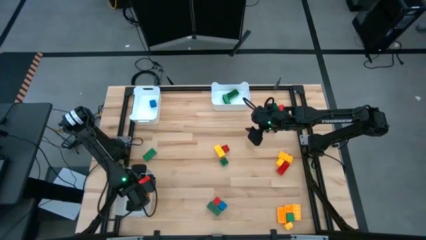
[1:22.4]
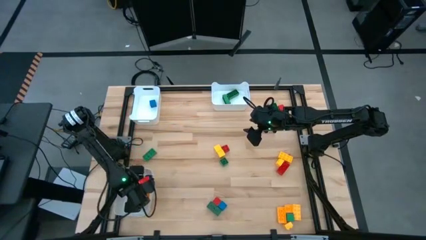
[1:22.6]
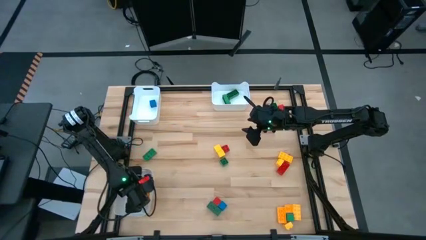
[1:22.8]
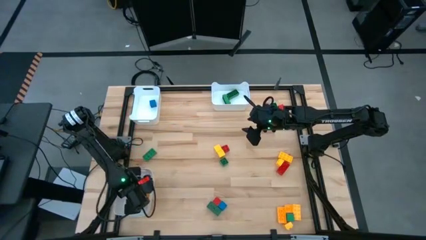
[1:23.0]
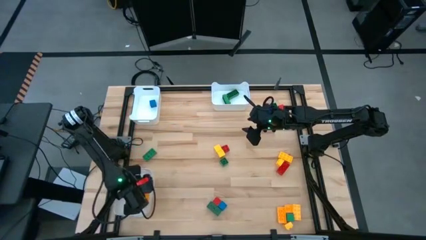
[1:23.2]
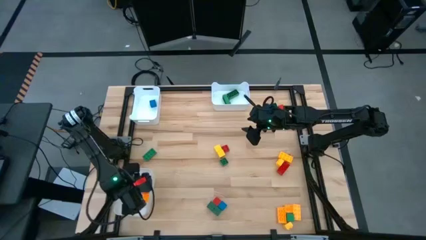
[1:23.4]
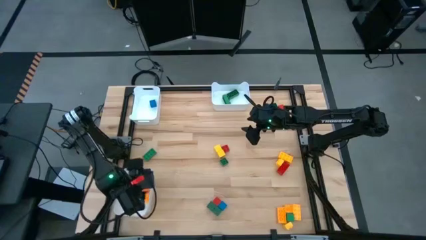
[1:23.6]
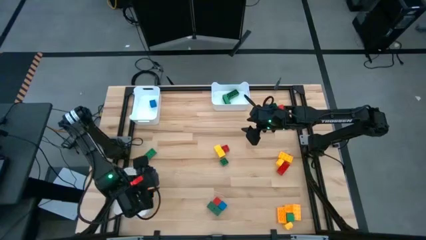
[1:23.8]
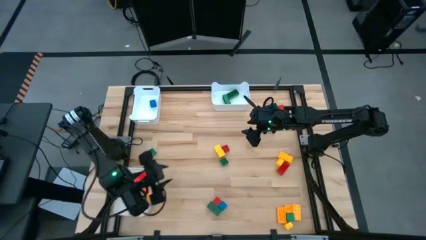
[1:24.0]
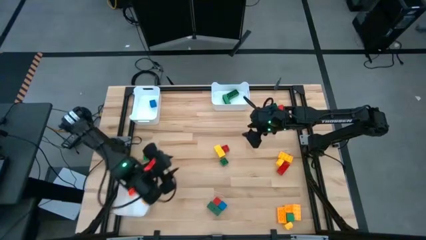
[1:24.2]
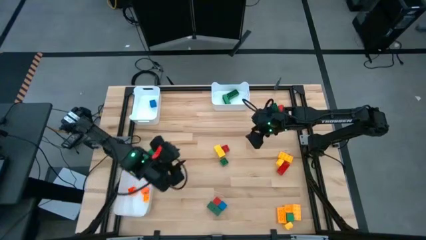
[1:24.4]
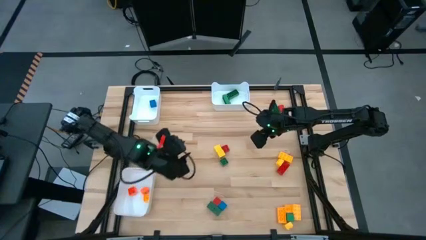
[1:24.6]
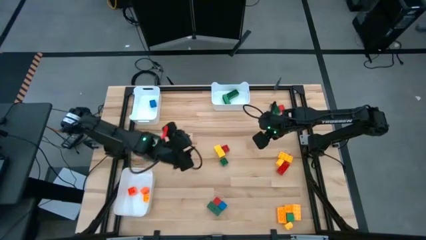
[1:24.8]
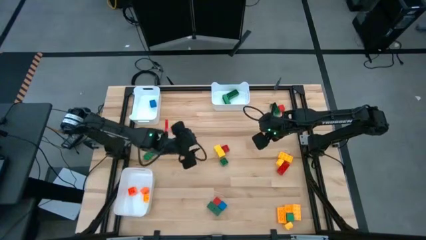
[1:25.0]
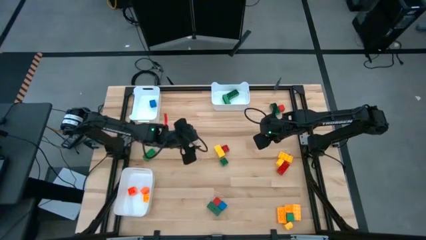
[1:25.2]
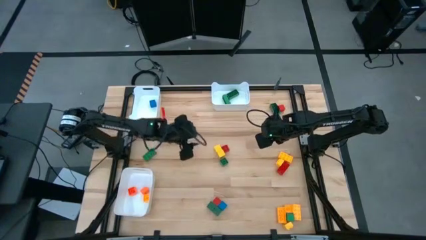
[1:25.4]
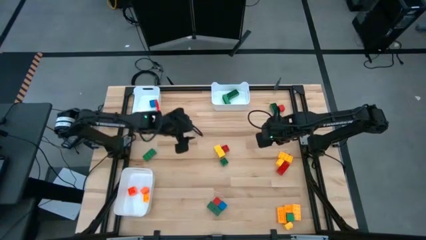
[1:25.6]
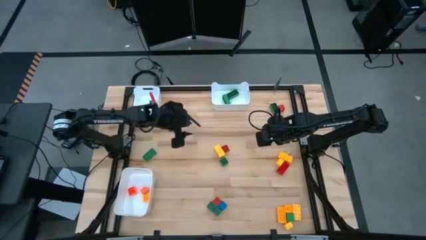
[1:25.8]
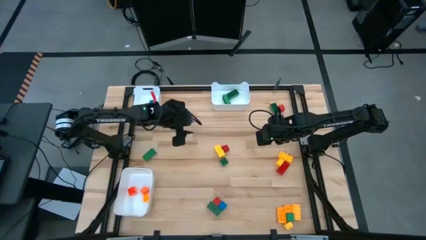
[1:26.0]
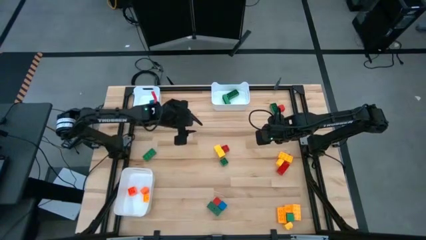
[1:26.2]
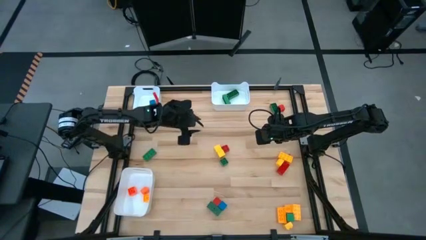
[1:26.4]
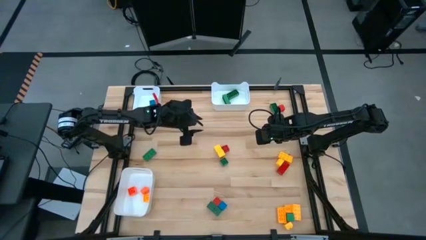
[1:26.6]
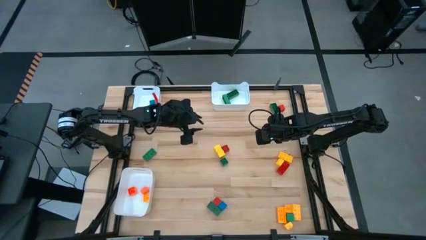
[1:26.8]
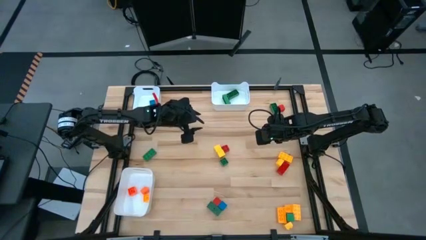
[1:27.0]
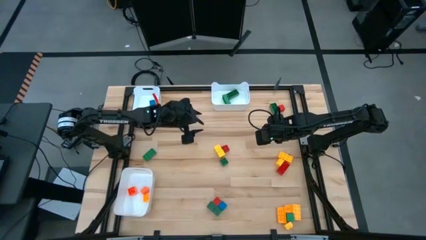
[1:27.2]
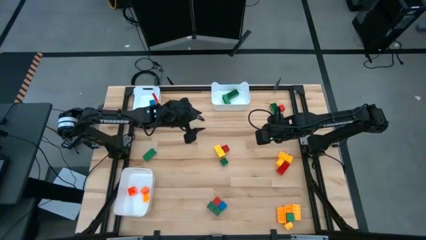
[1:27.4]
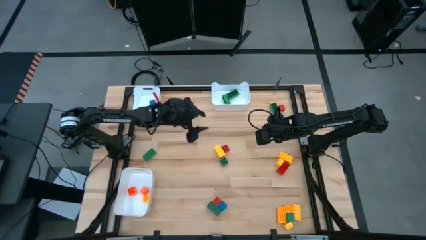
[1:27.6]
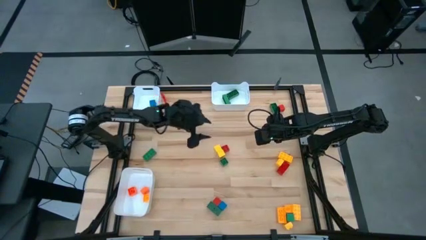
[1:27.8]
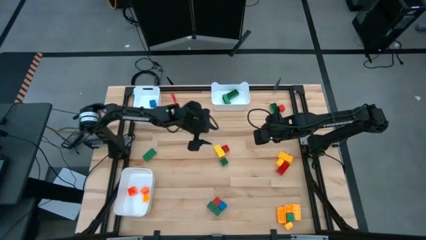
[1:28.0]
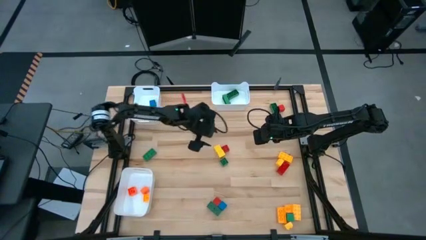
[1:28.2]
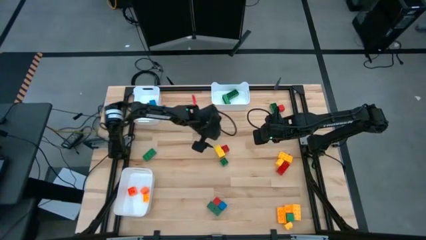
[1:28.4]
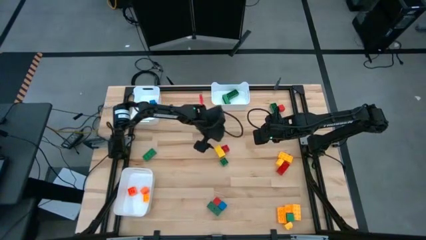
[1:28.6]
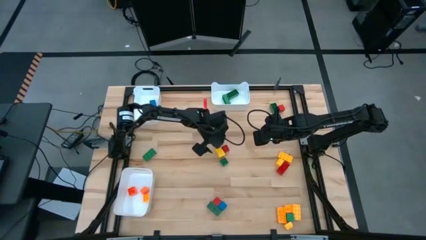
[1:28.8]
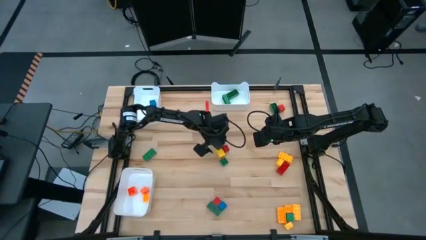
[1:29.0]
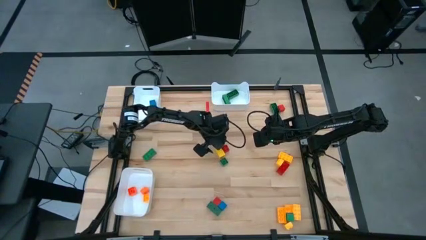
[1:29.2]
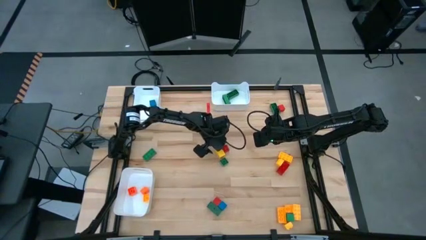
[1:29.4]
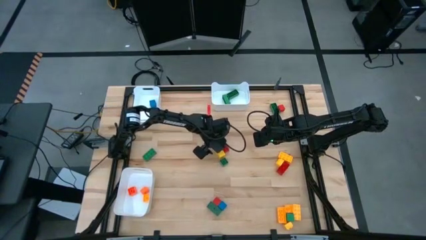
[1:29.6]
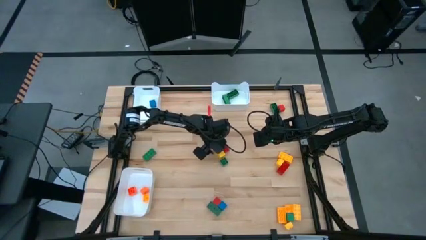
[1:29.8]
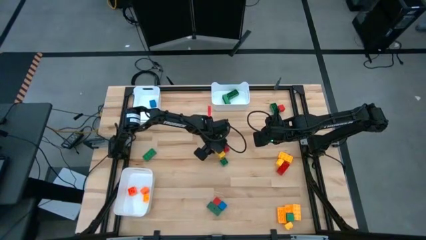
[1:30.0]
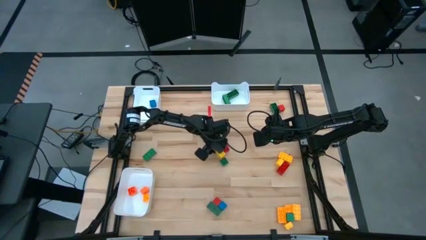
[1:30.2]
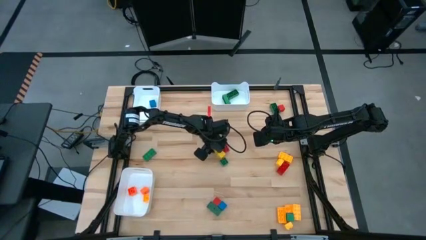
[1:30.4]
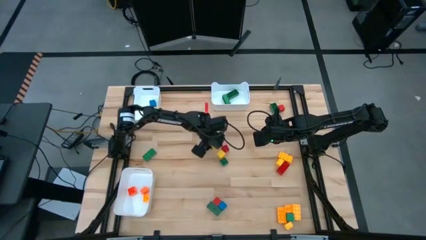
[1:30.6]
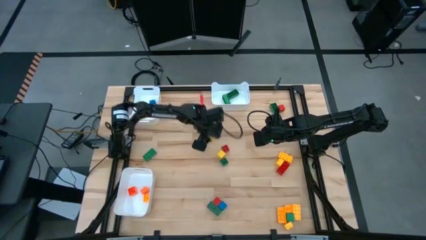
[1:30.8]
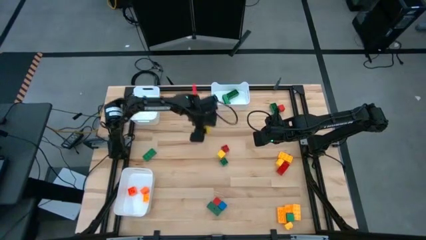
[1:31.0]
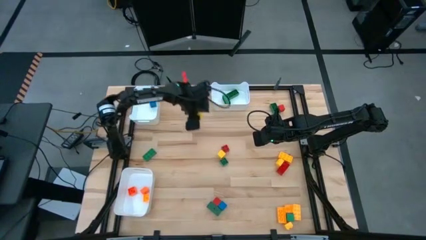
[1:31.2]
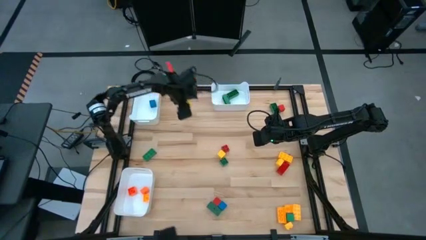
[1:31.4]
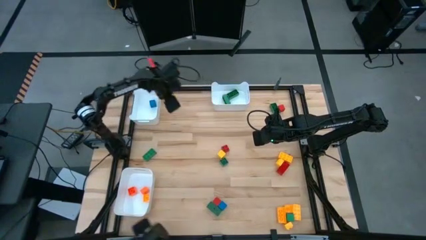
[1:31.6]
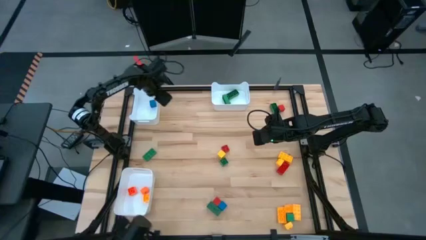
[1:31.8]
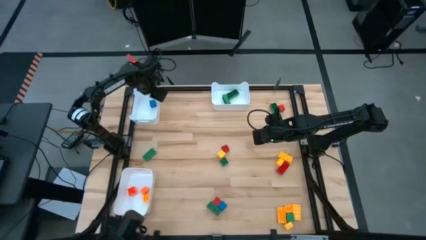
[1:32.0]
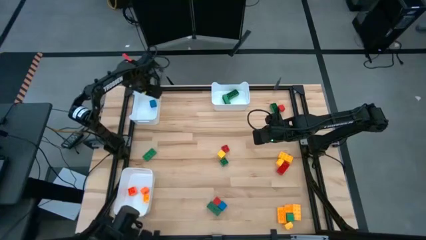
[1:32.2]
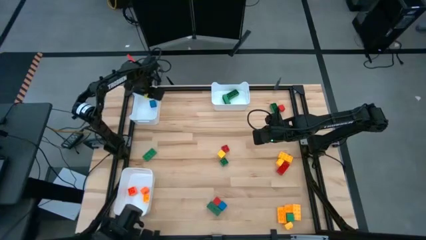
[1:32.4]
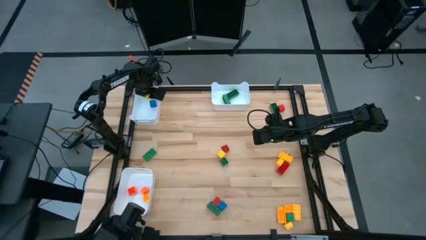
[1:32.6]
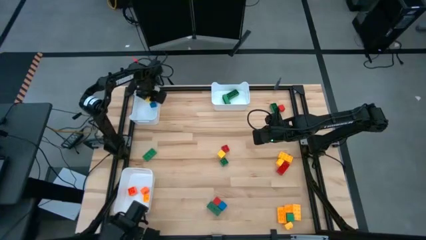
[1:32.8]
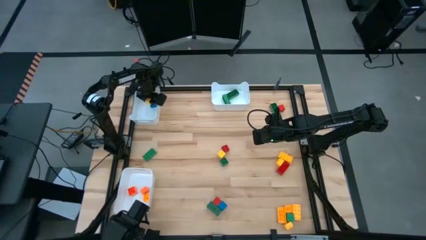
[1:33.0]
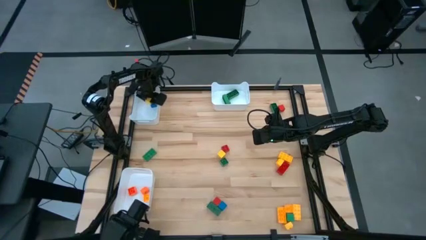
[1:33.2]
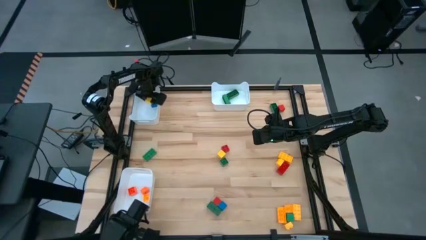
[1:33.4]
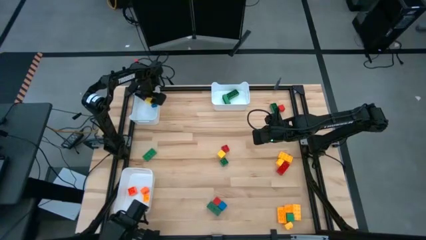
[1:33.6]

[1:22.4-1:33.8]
Task: Sort blocks by size
Put the yellow block into the top left white bin

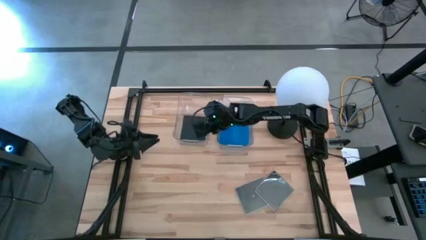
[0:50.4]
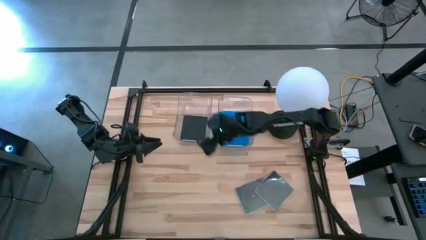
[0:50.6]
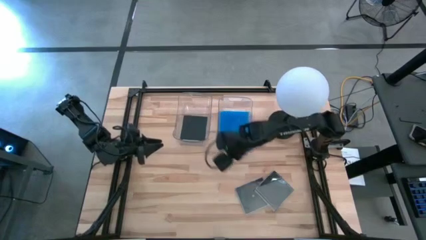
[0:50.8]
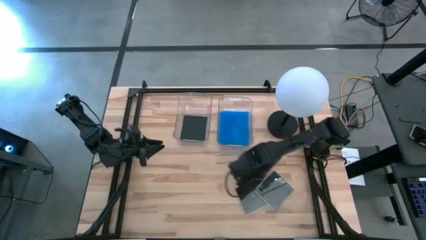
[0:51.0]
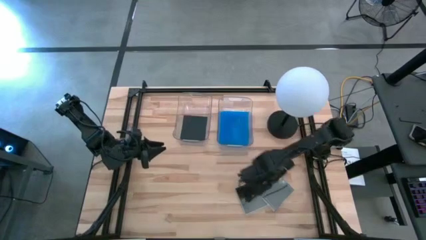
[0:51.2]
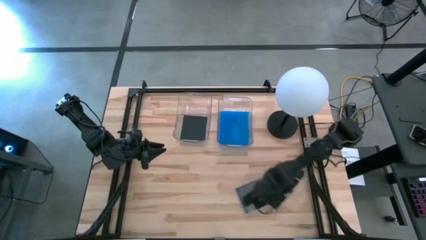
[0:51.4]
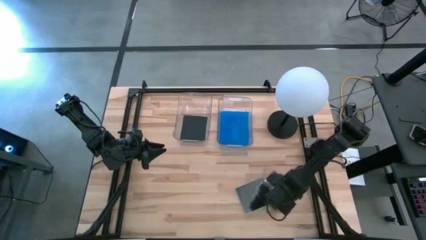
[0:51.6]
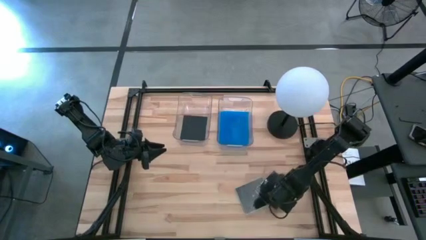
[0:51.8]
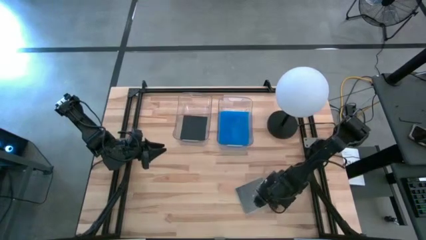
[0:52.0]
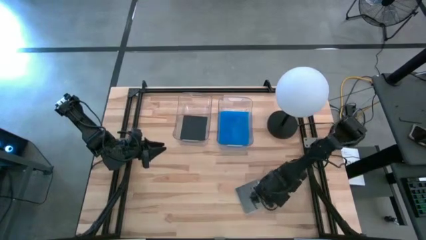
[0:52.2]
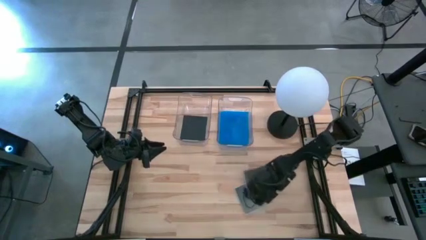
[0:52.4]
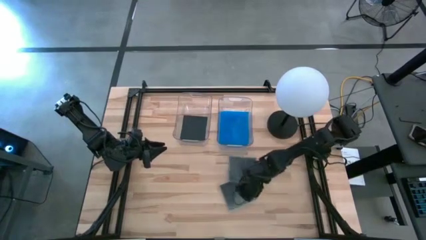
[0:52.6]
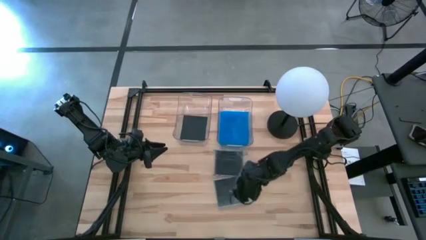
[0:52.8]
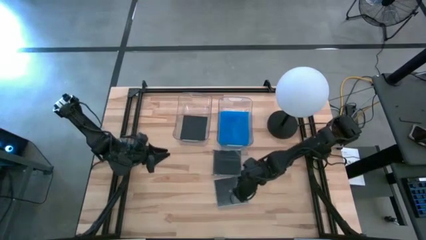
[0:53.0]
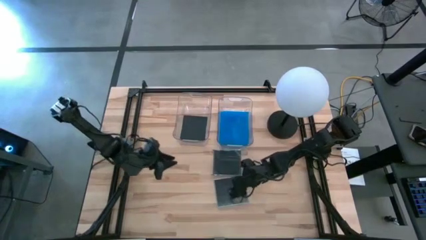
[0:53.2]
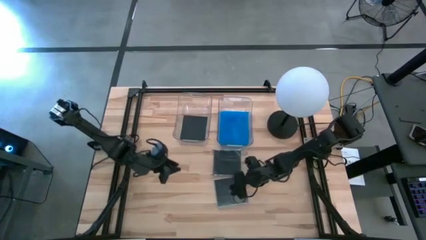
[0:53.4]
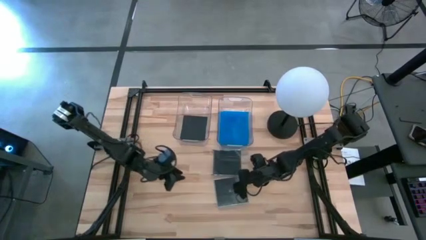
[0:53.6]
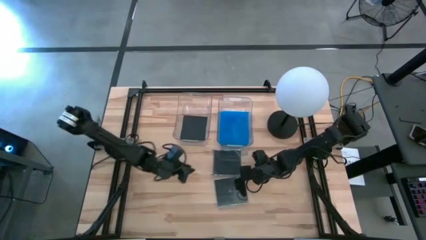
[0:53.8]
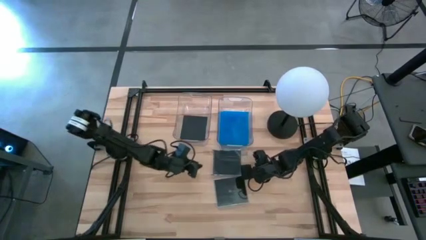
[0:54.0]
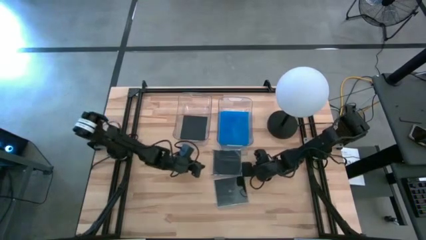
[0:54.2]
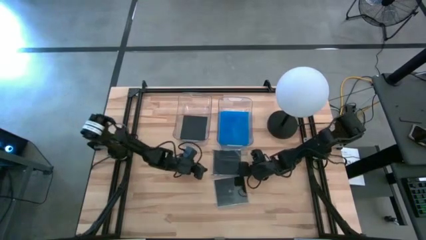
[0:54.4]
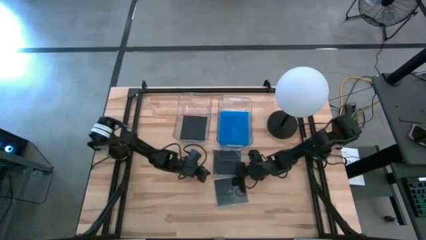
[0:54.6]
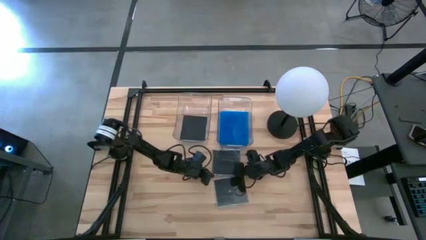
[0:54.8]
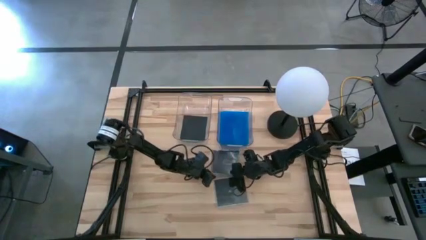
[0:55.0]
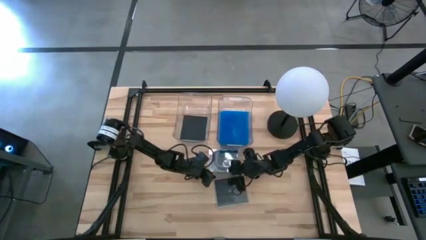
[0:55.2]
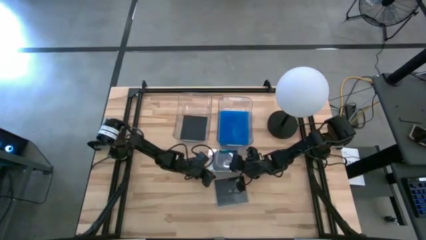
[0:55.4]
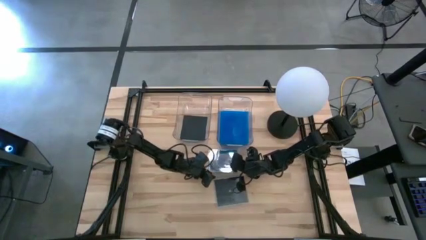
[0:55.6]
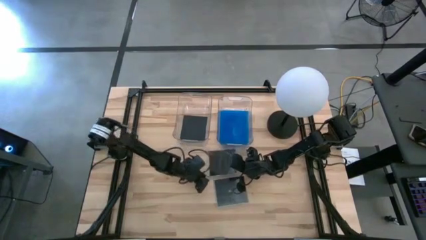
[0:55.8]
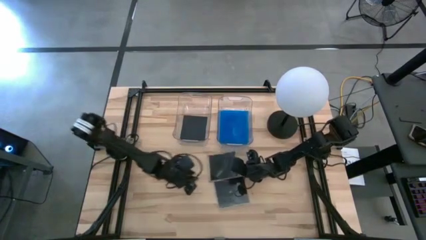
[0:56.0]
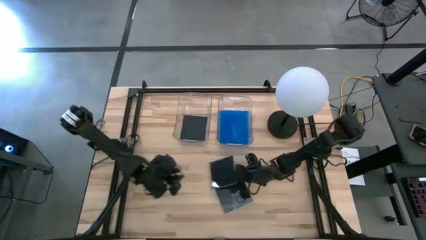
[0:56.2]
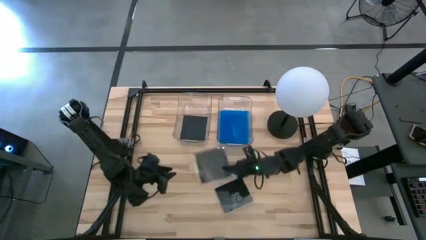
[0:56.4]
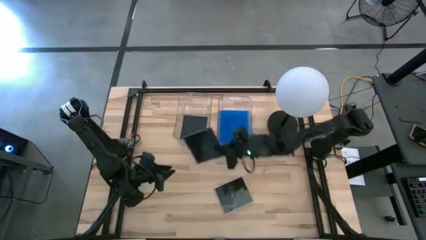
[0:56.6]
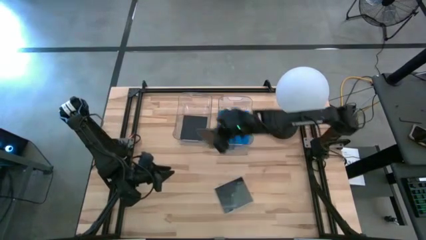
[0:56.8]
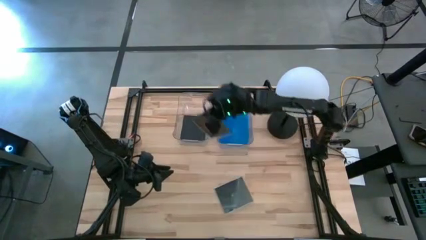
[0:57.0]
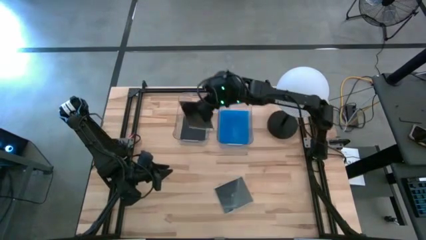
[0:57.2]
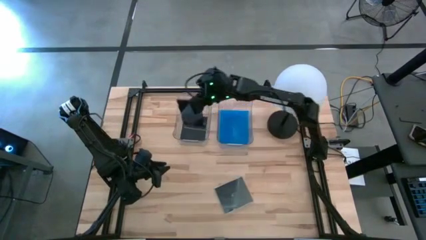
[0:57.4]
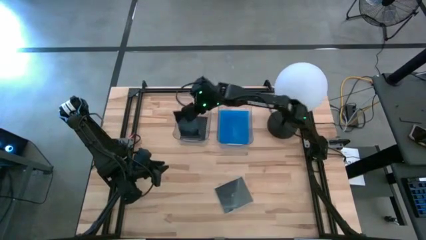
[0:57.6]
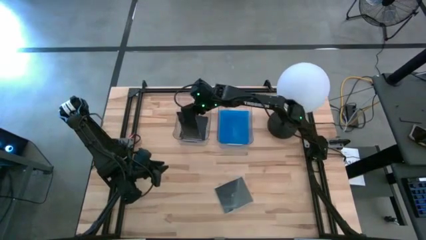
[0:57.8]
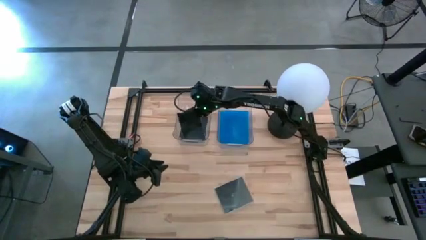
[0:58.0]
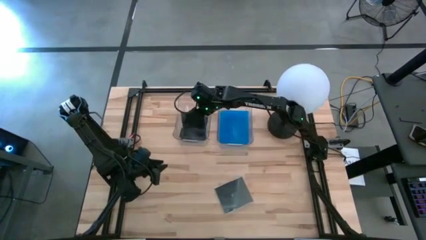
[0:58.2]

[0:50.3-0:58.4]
Task: Pick & place jewel cases by type
Put the right black cd case into the left transparent bin
